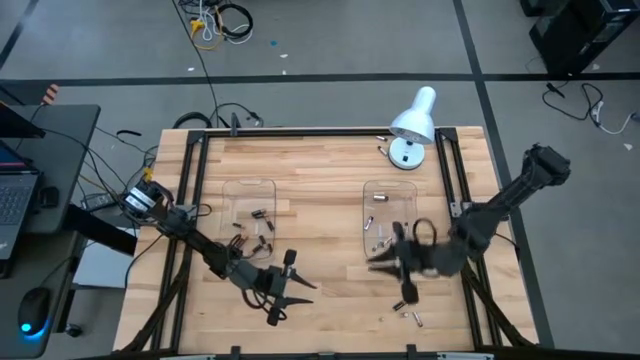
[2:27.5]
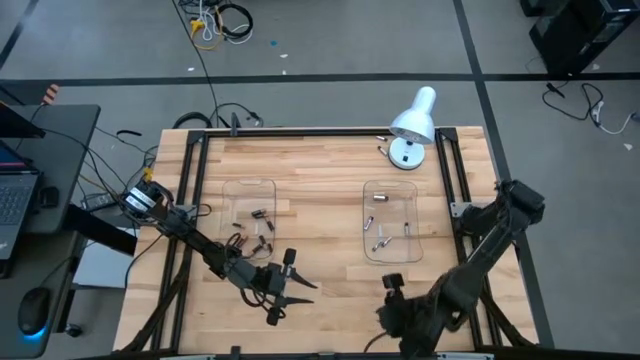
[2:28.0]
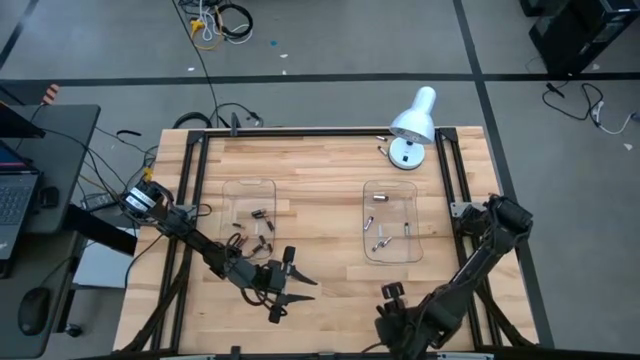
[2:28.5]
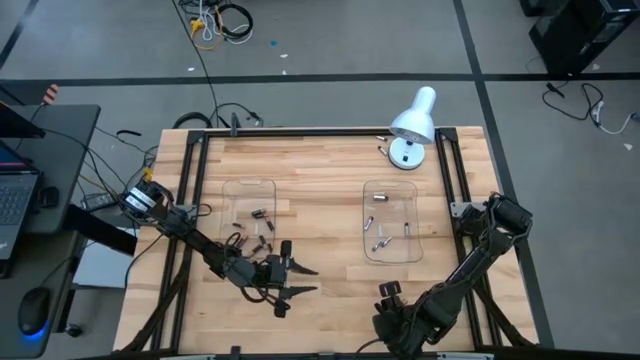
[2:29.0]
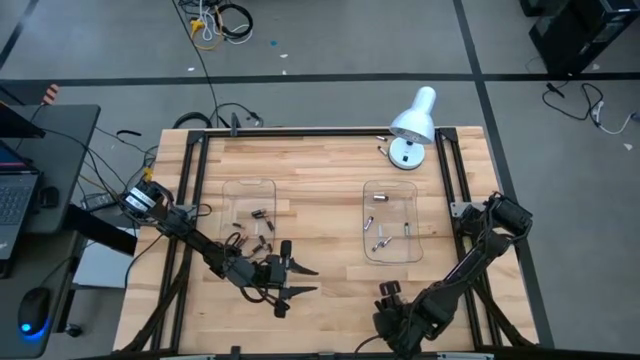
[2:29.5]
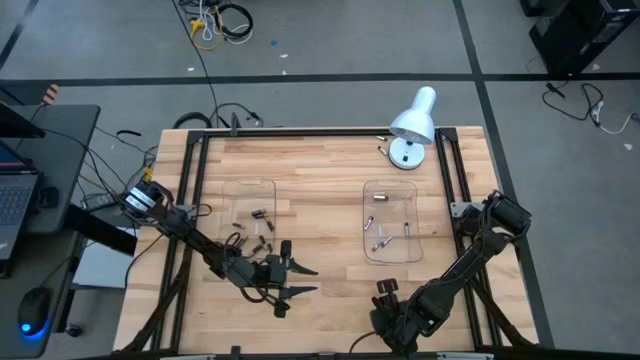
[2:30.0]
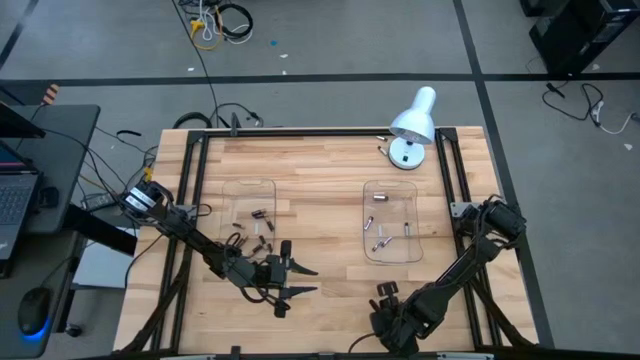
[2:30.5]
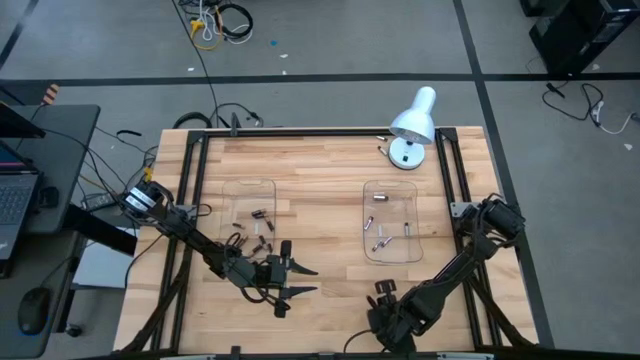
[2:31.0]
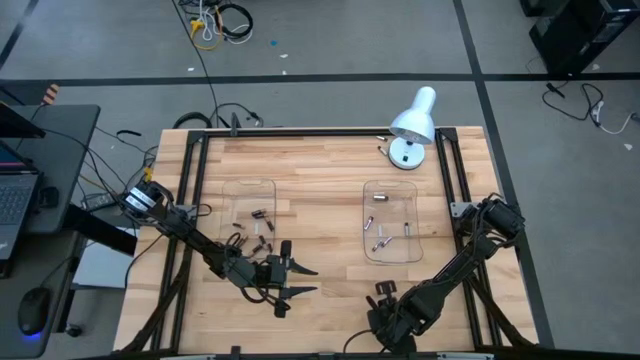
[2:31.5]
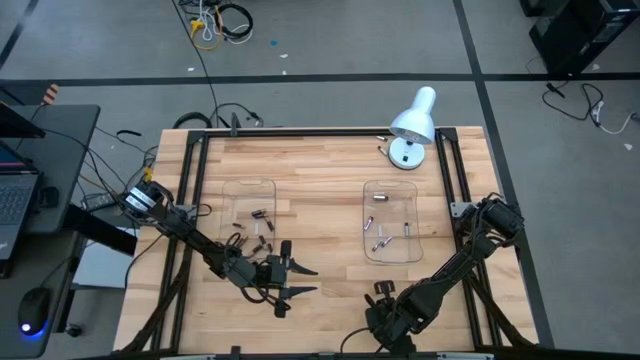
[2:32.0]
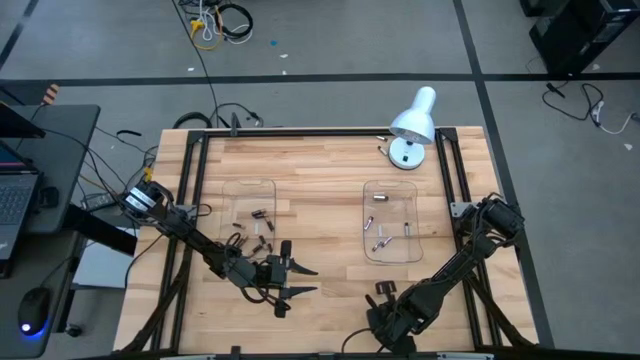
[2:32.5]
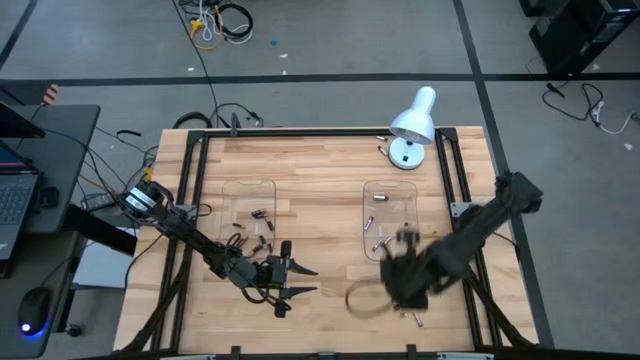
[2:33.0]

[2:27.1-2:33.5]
Task: Sort batteries
Put the silver battery into the right transparent bin

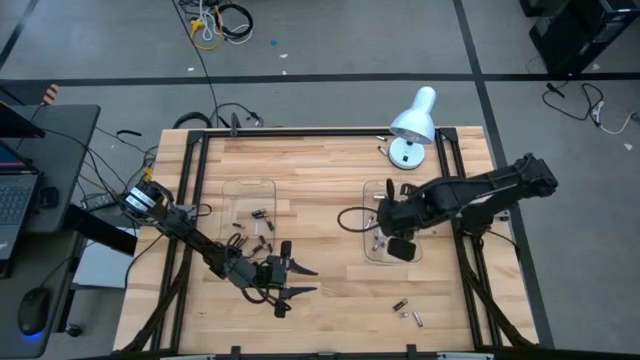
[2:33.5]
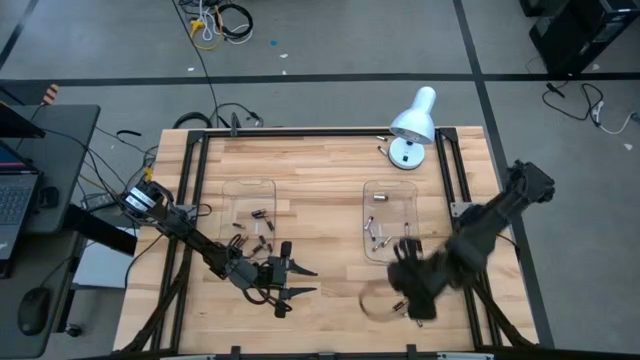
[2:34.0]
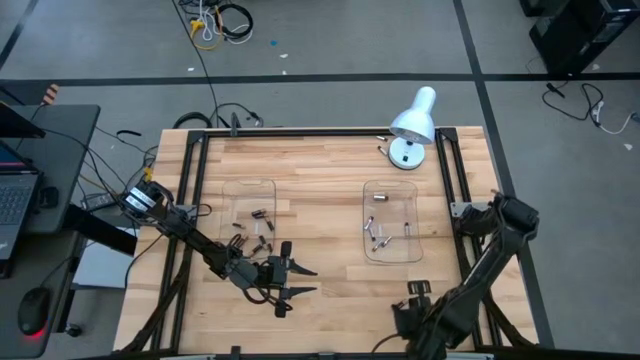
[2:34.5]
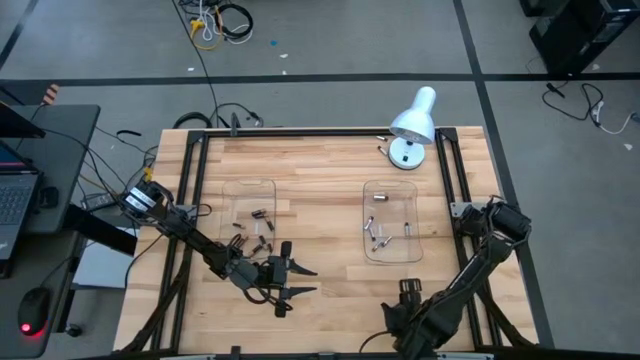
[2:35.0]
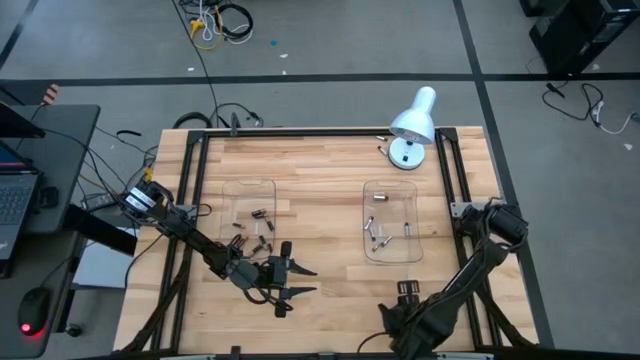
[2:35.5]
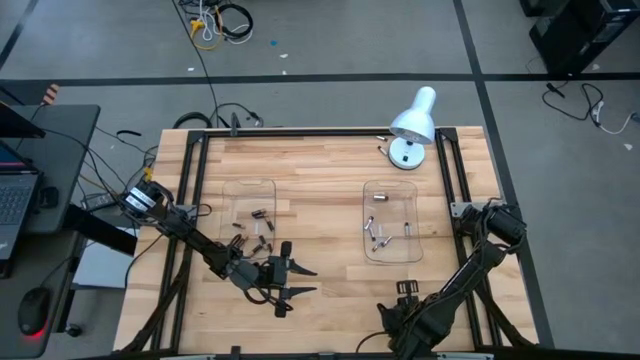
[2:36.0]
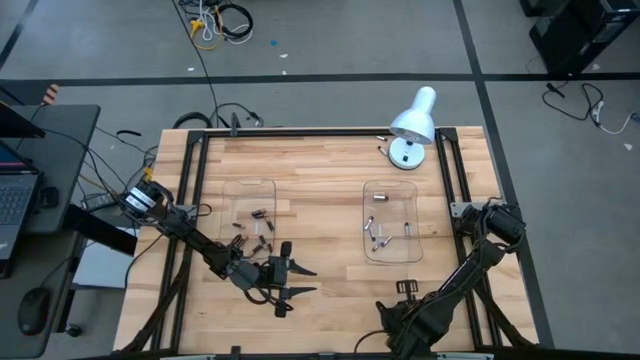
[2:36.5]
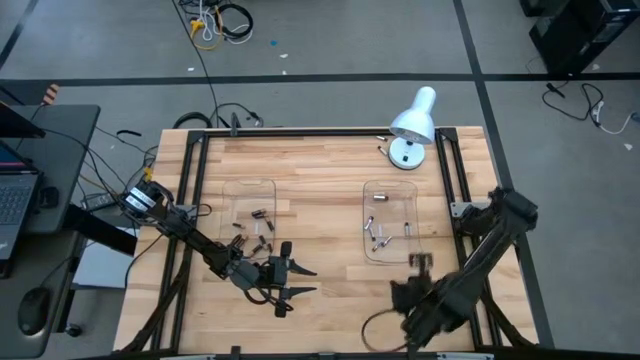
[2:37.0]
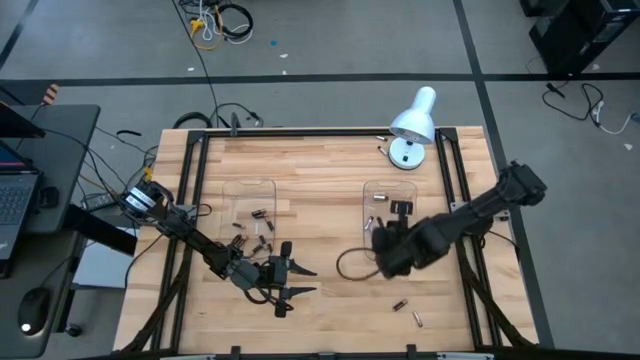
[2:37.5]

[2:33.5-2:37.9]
Put the silver battery into the right transparent bin

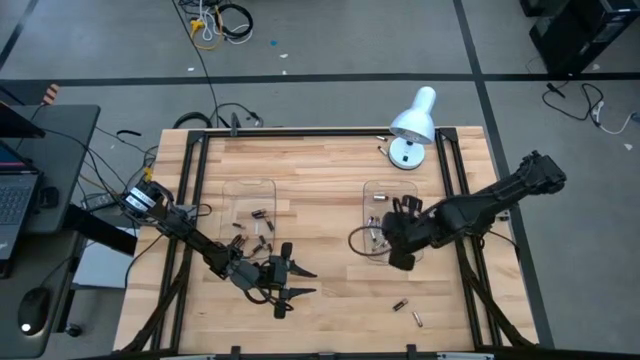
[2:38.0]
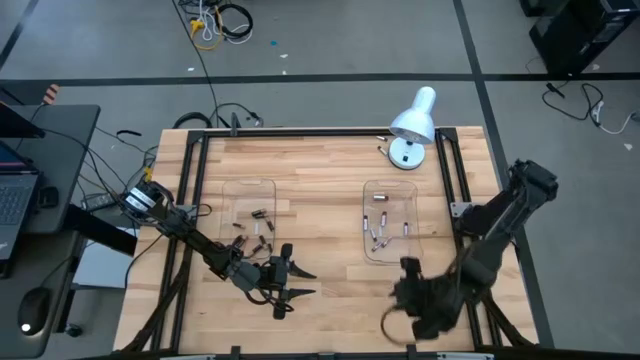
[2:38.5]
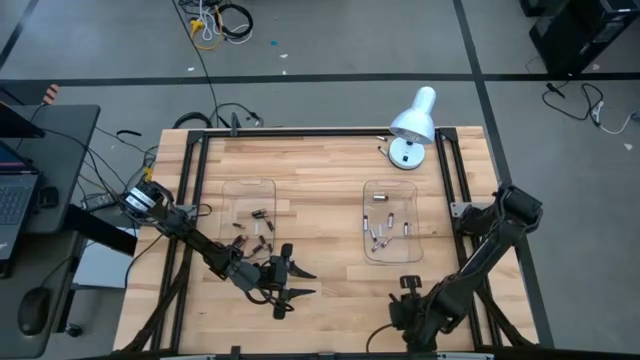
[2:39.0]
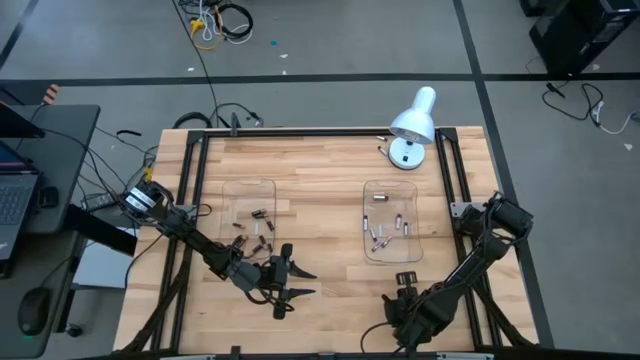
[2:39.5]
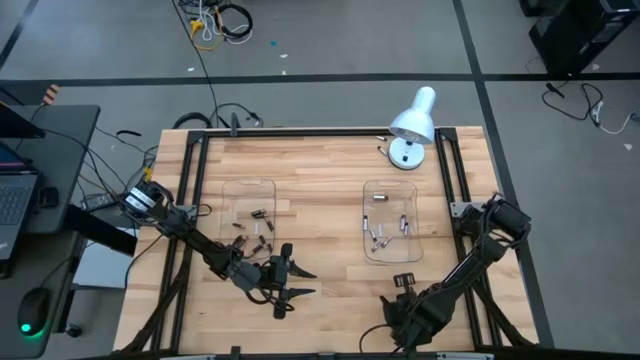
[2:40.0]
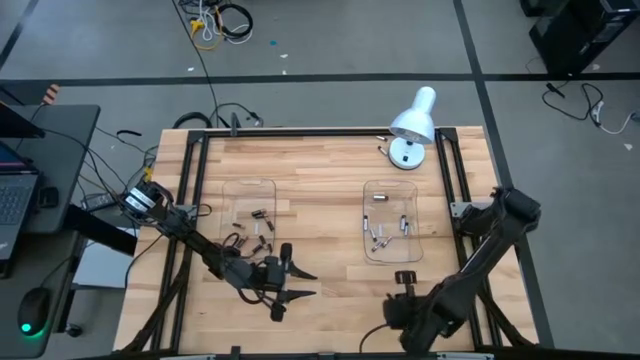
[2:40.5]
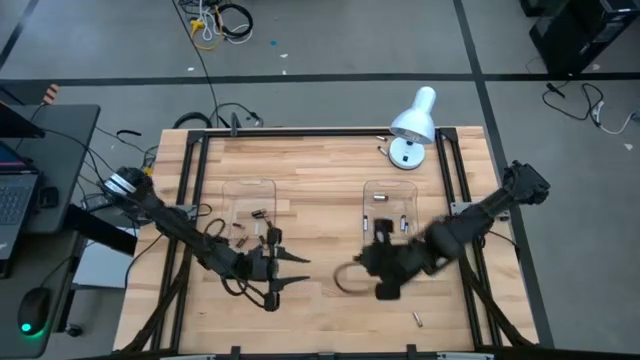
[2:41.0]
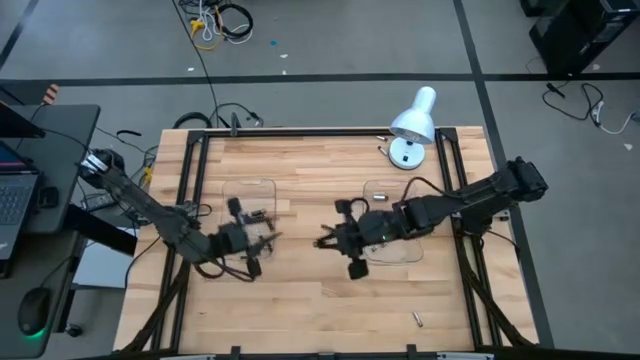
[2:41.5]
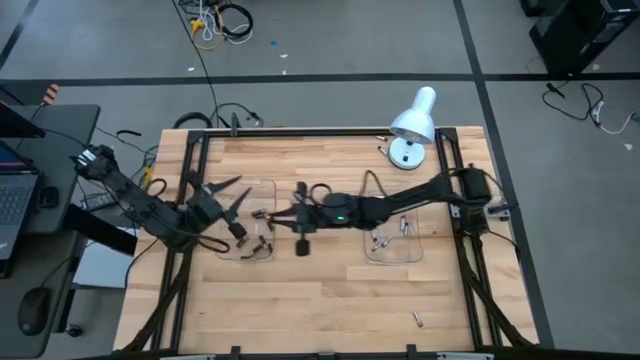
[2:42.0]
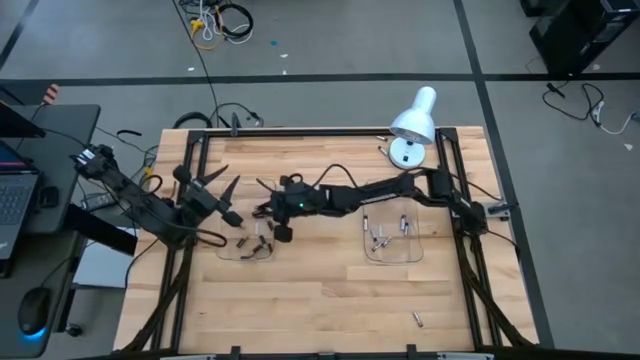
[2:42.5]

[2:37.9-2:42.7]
Put the black battery into the left transparent bin

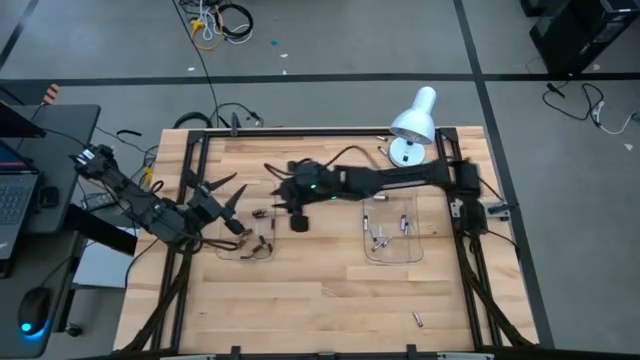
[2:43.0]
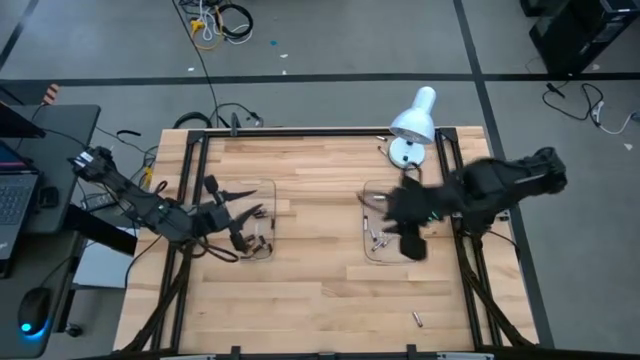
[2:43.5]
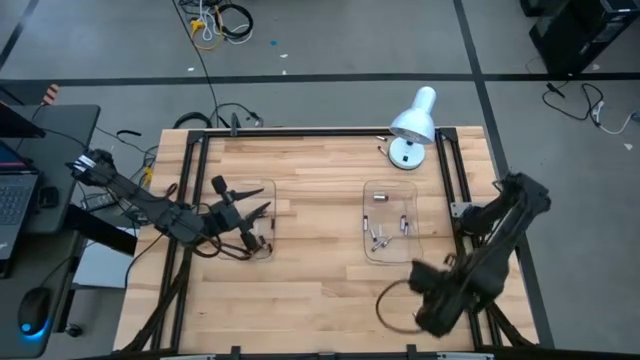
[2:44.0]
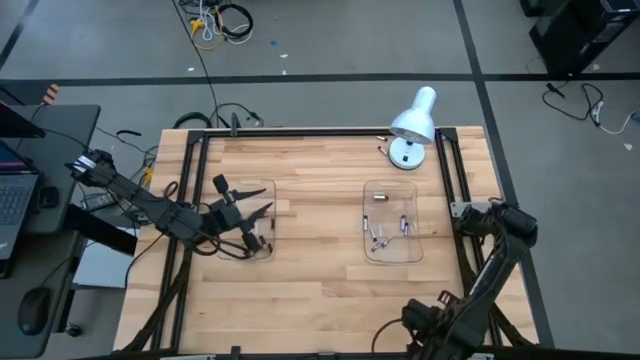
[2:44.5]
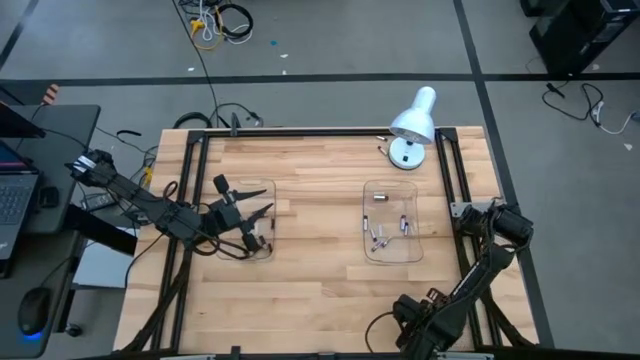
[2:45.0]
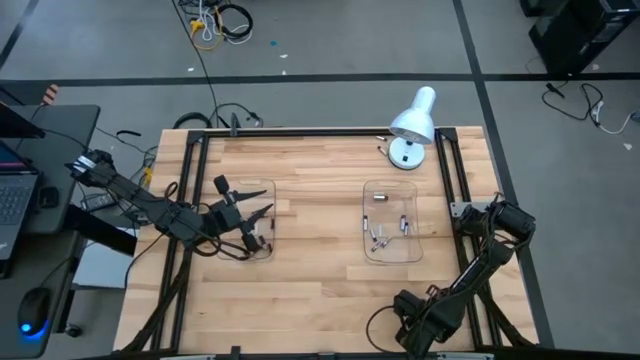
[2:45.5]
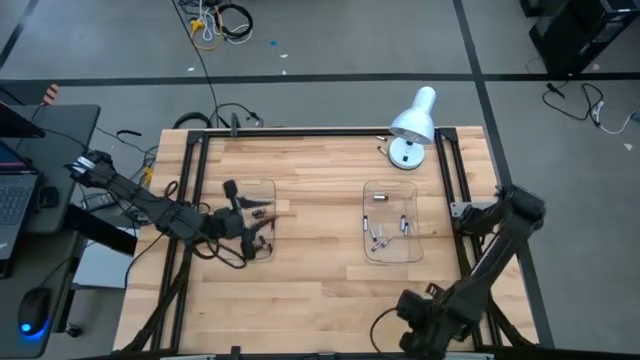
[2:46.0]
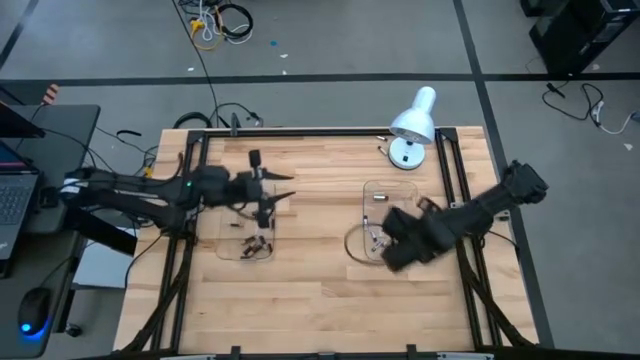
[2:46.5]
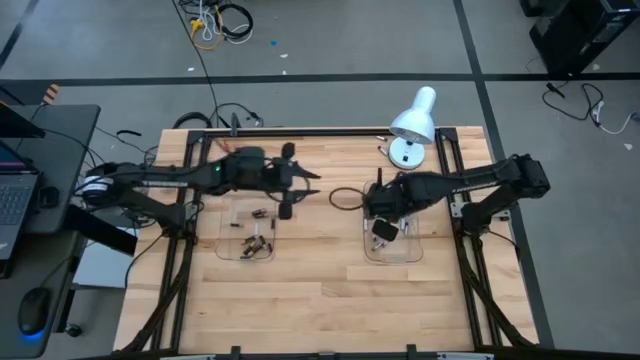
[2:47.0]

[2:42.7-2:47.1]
Put the silver battery into the right transparent bin
